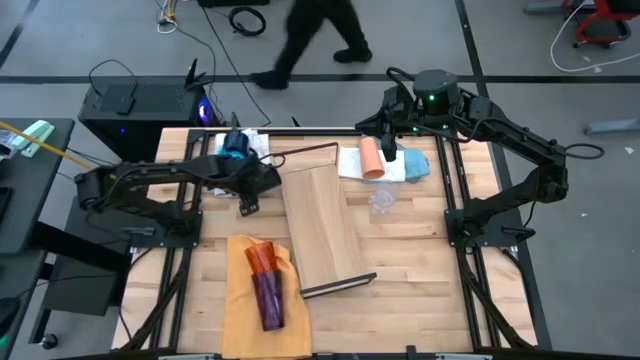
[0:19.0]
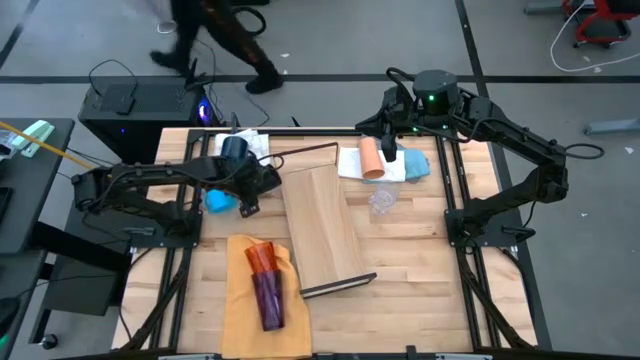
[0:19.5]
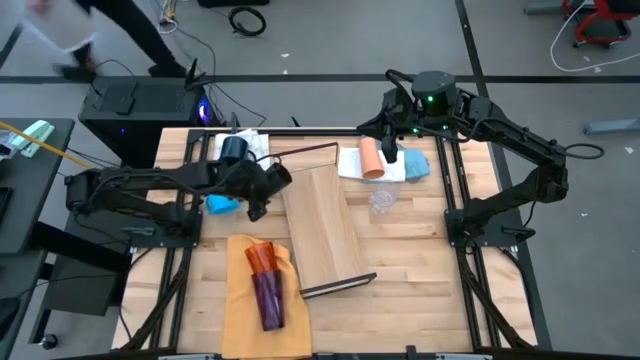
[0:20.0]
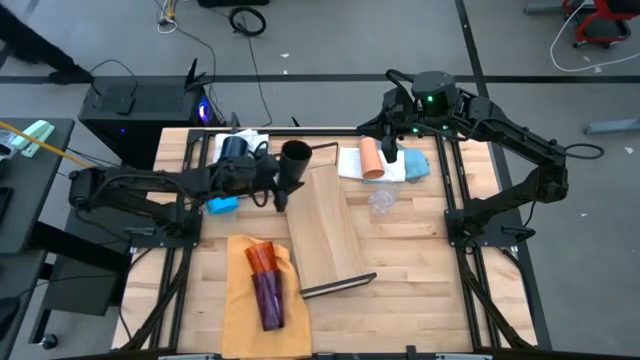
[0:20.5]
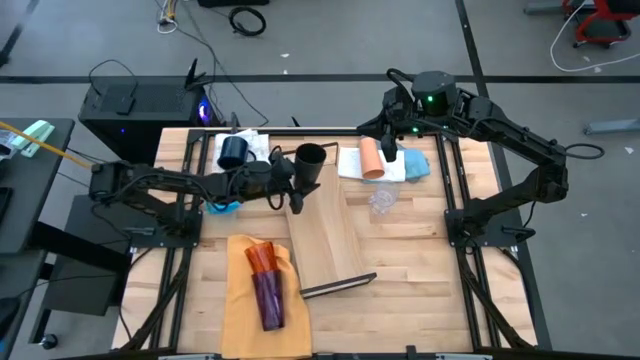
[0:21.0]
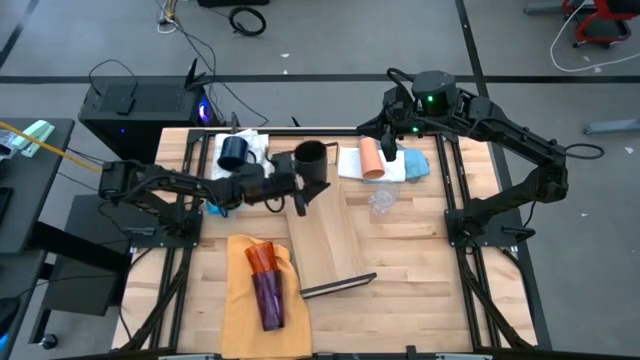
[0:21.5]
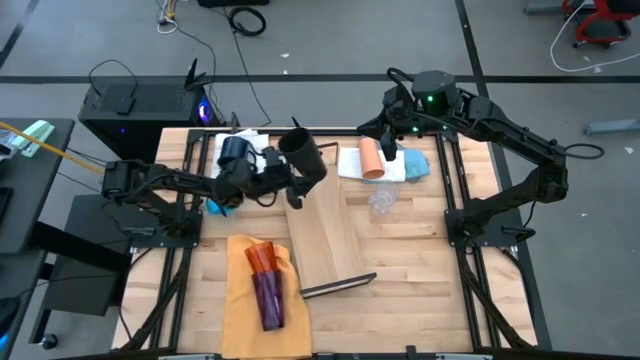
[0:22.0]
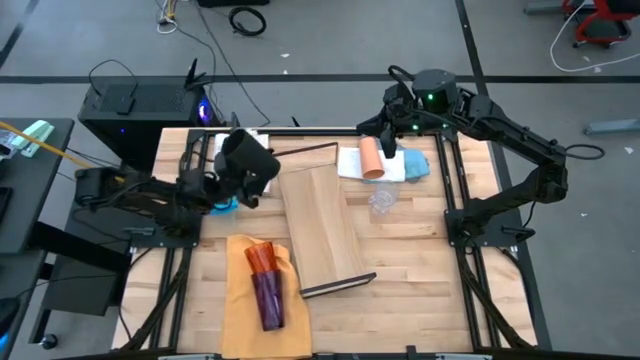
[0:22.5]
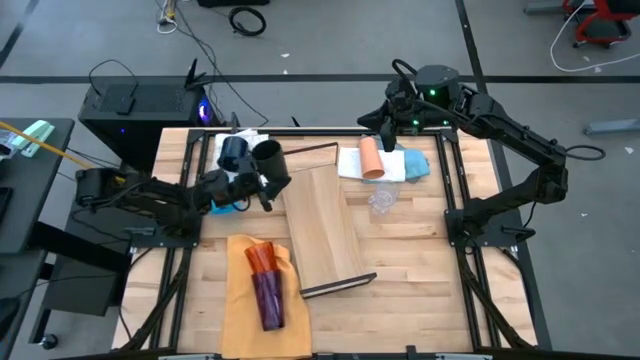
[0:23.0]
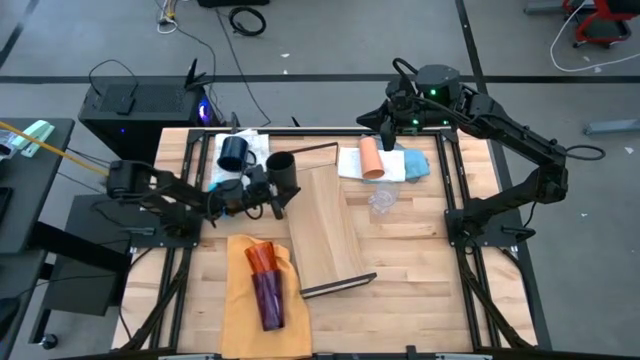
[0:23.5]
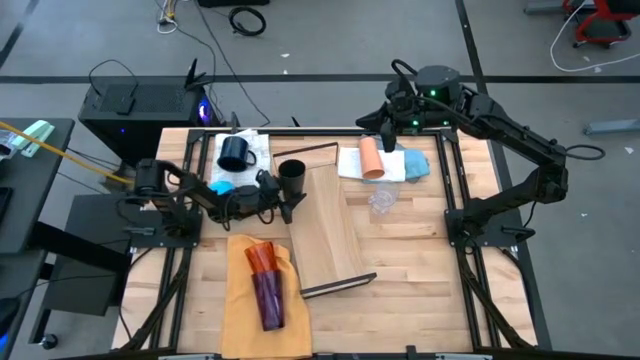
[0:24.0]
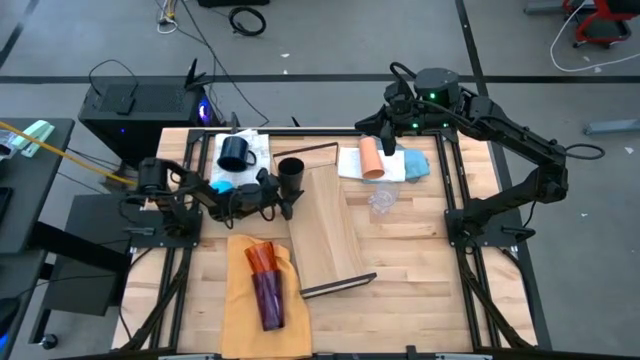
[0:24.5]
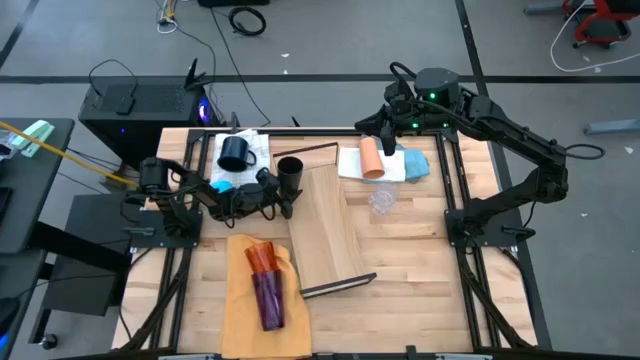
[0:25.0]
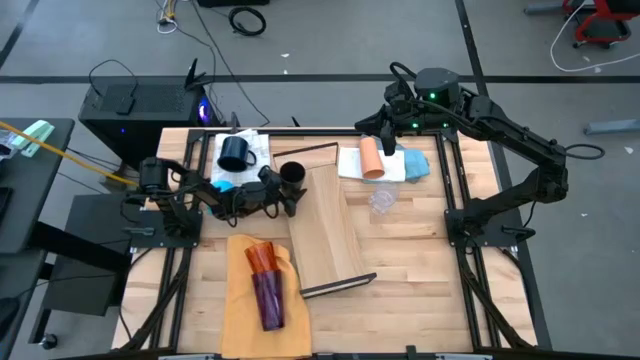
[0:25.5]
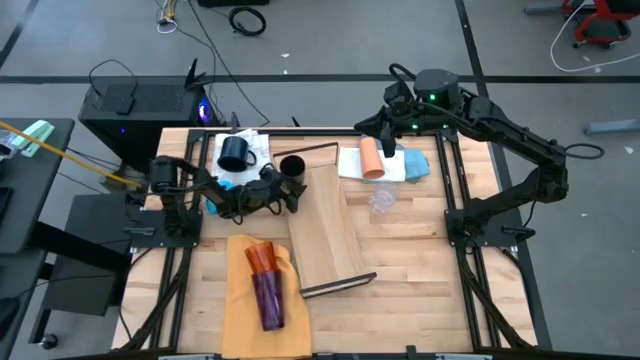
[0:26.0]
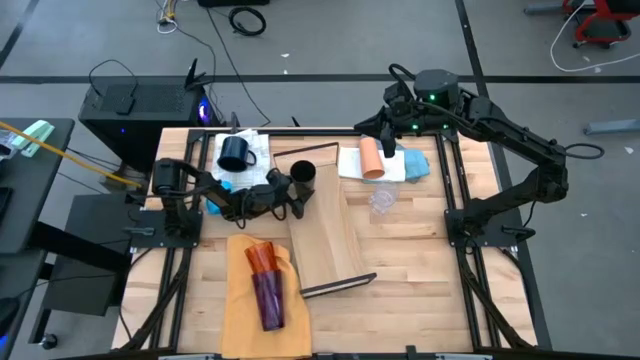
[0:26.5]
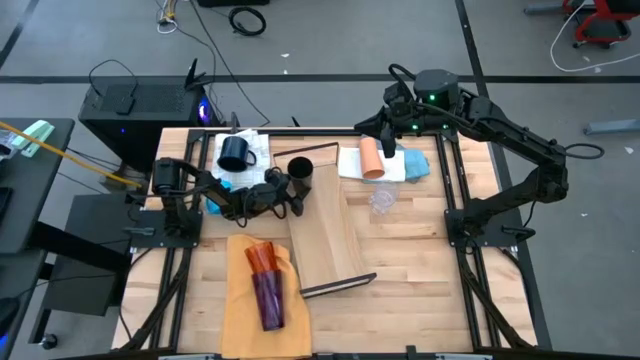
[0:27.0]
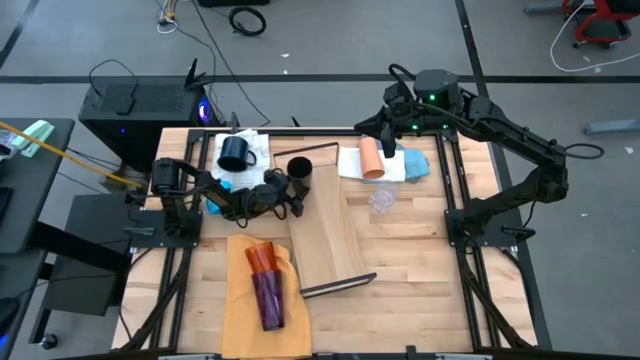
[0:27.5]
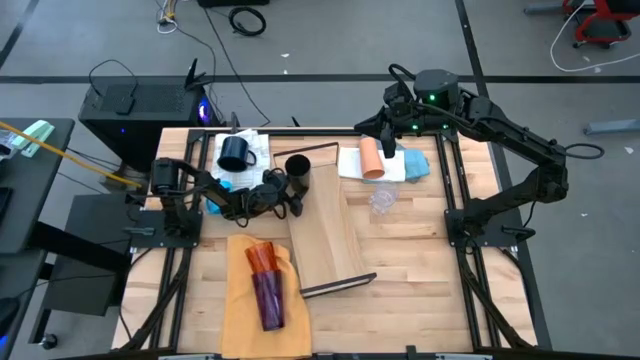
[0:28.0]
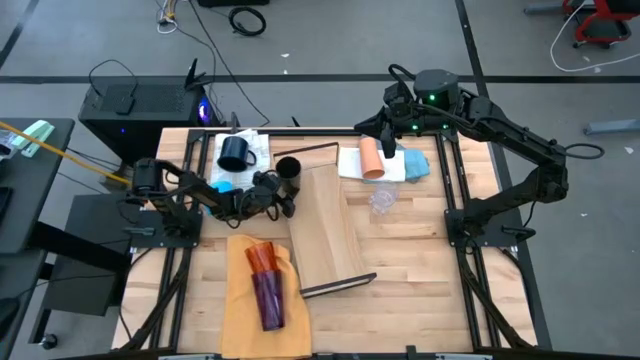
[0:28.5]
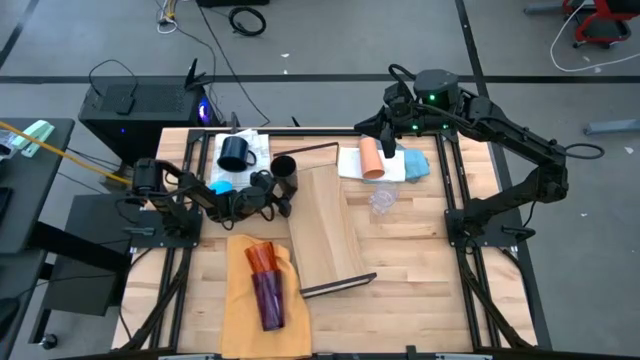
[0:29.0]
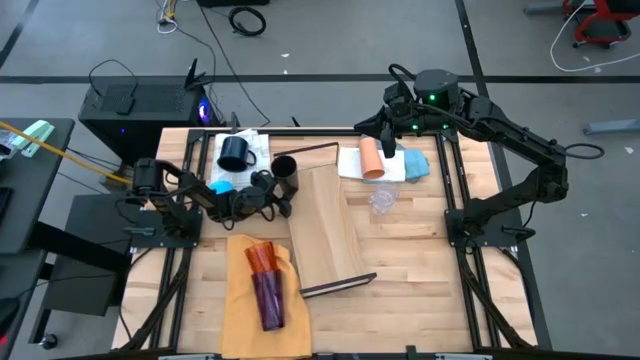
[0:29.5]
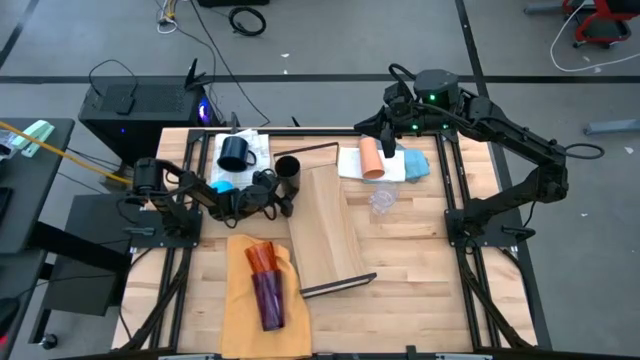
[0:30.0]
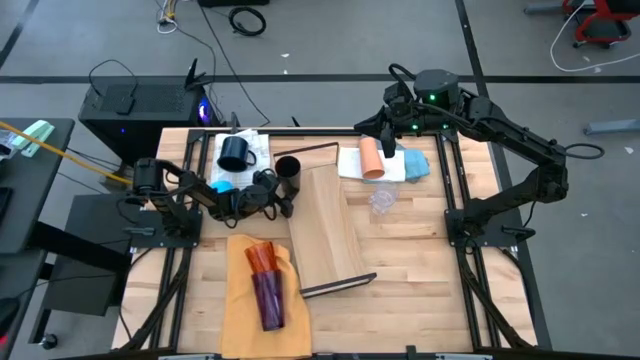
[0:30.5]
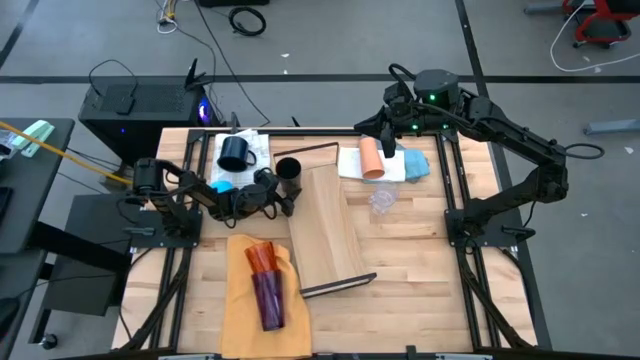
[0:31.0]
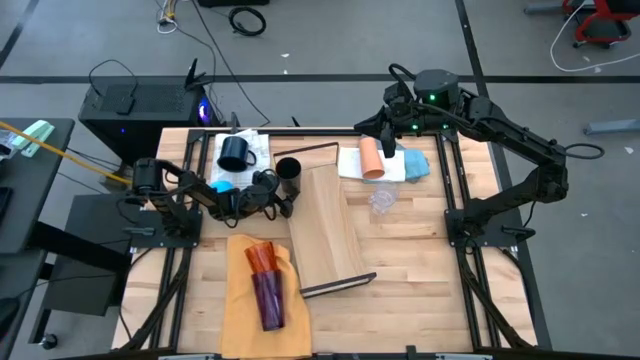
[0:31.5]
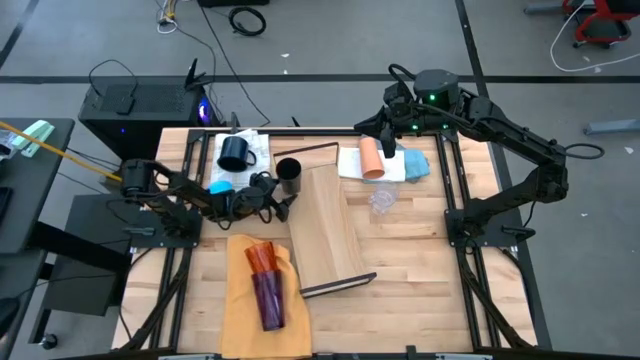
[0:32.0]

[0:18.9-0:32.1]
Task: Stack small to large cups/mugs on shelf
Put the black cup on the shelf

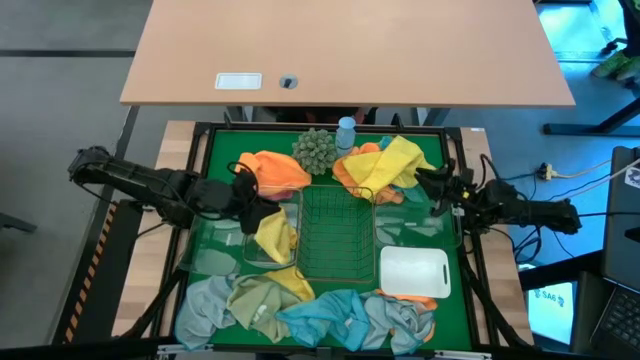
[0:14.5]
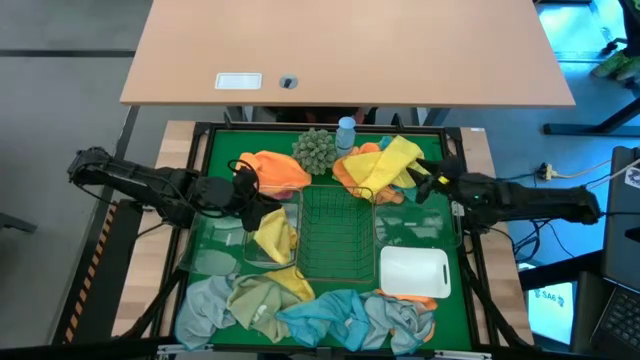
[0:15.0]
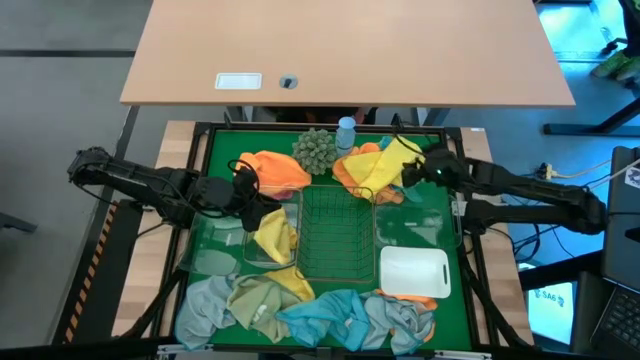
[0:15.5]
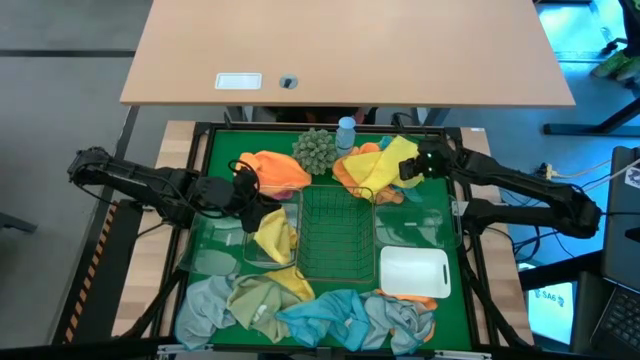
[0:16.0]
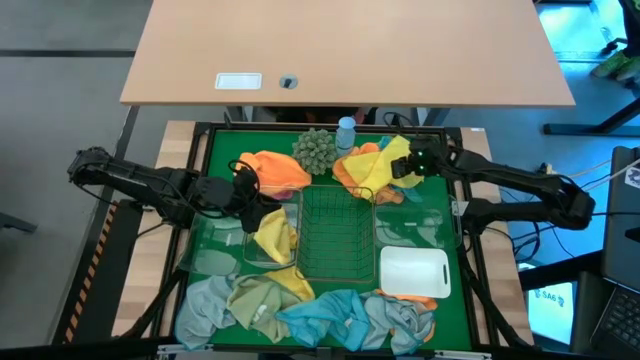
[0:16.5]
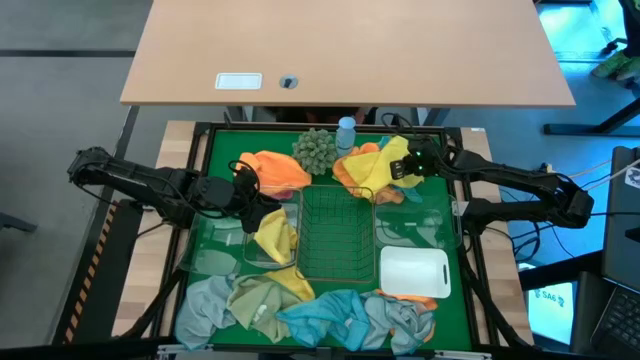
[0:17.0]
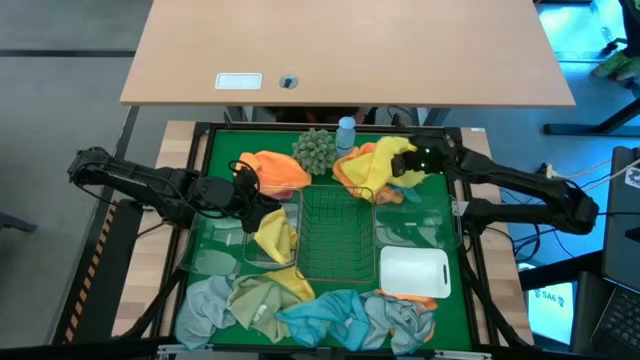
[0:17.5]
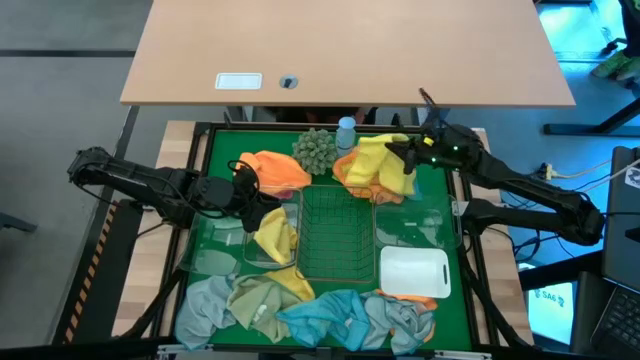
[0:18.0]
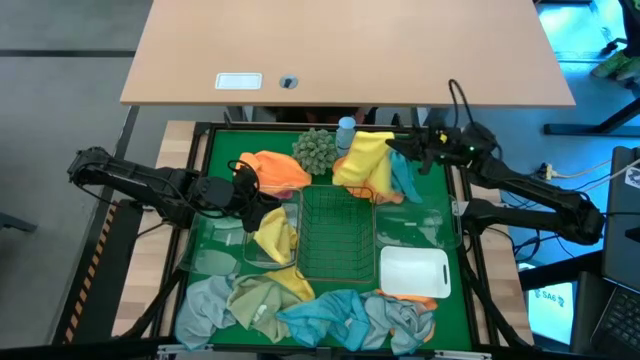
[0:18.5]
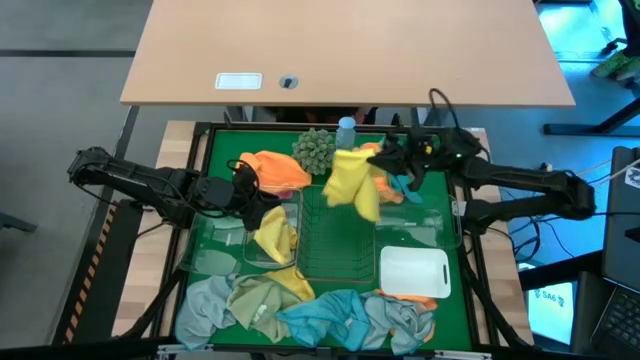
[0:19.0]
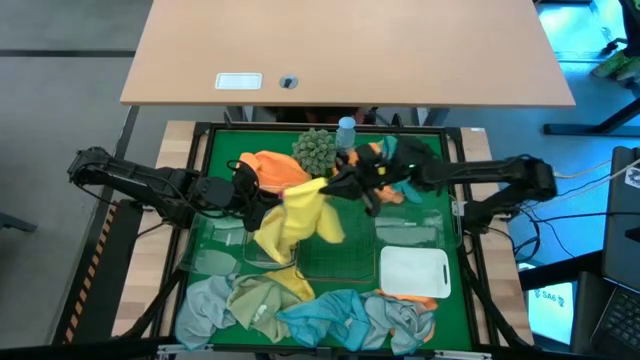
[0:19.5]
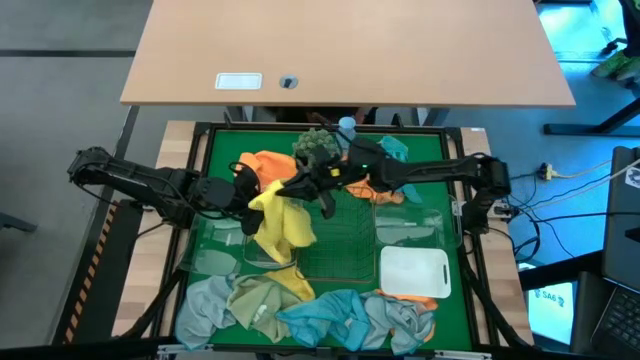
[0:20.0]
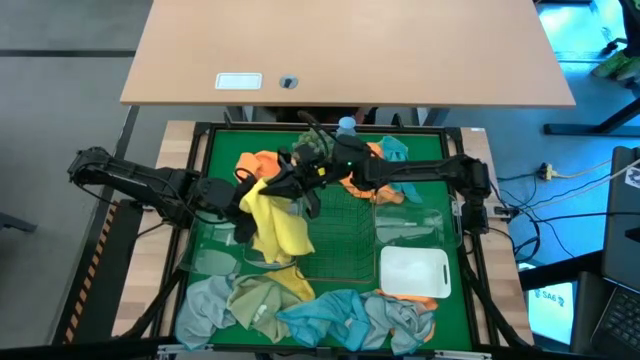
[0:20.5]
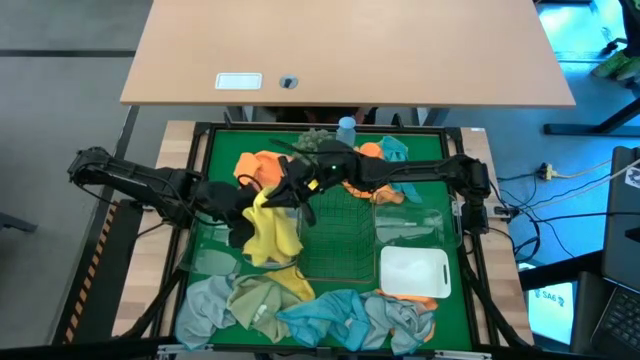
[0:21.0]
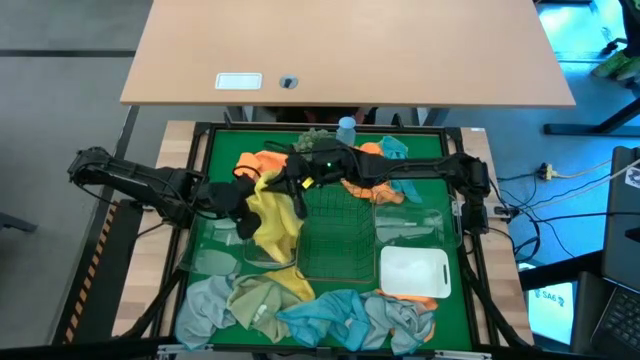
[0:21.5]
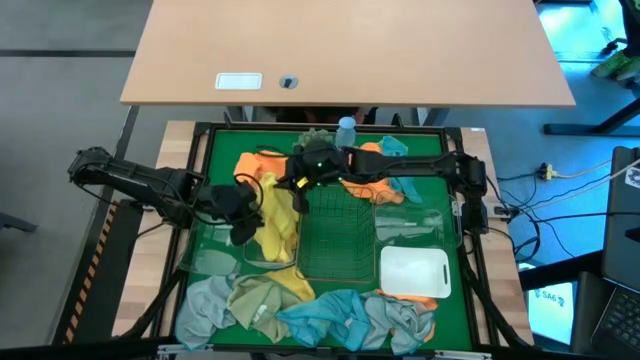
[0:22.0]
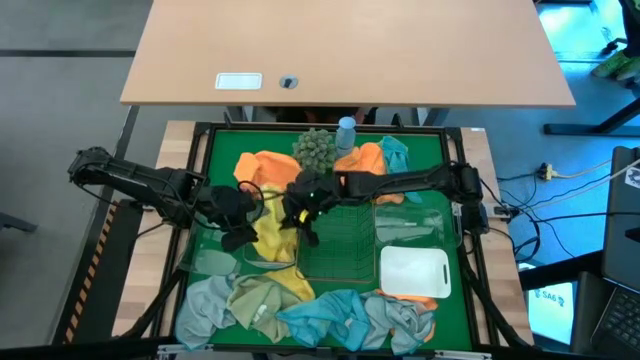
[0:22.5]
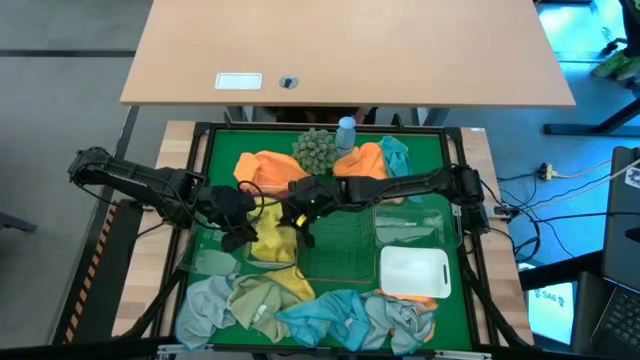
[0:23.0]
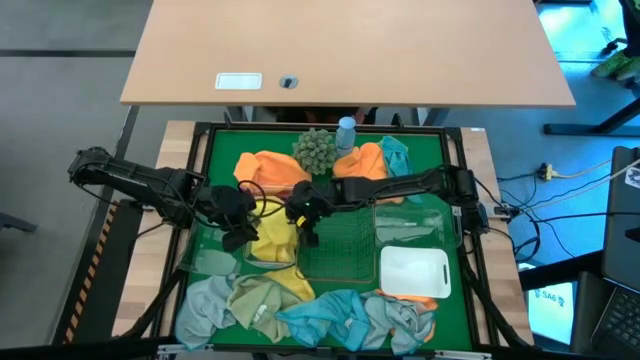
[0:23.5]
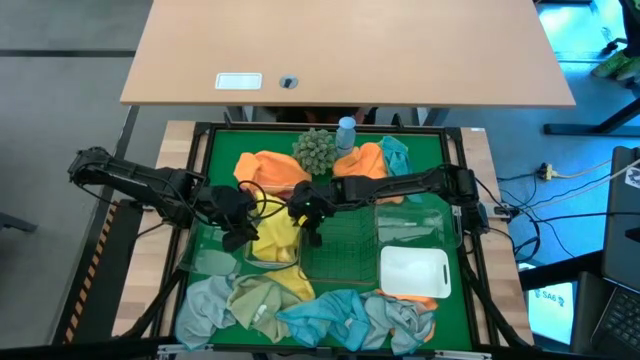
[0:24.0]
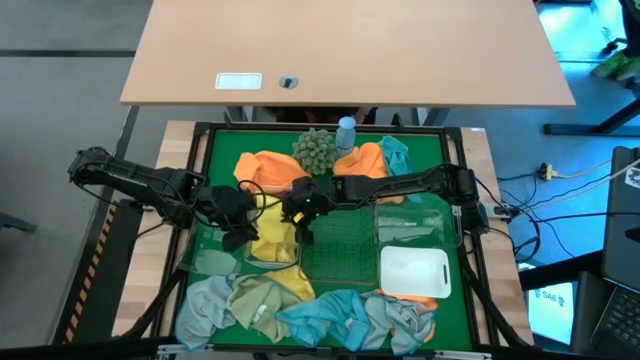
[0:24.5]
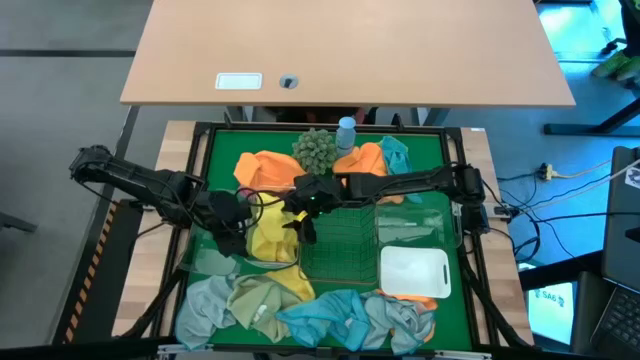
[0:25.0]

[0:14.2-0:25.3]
Task: Sort microfiber towel by color & place in baskets
Put the top right yellow microfiber cloth into the middle transparent bin
